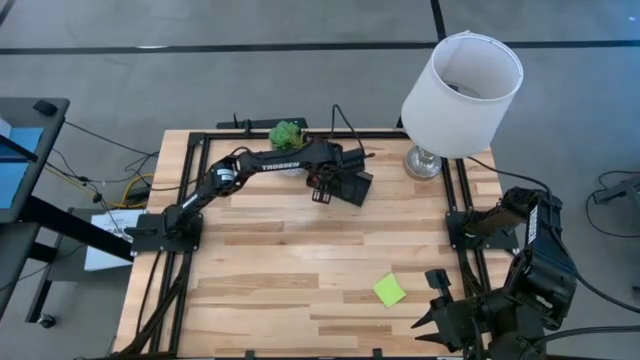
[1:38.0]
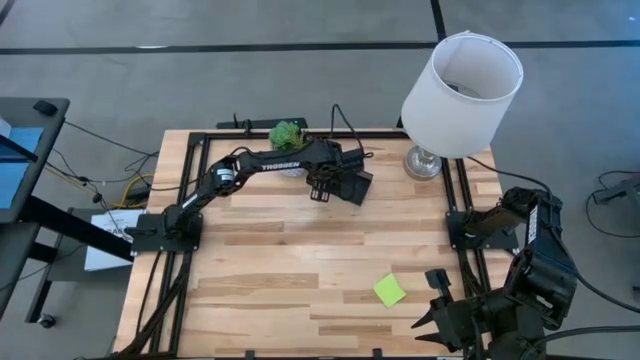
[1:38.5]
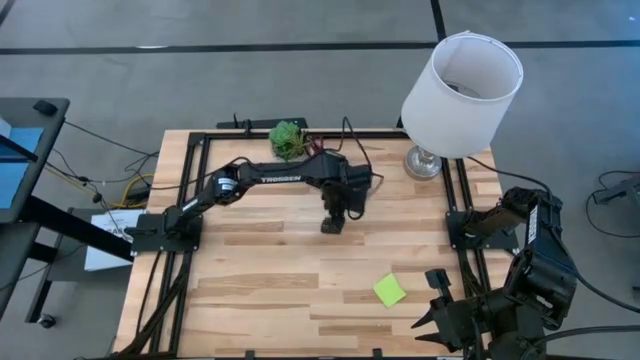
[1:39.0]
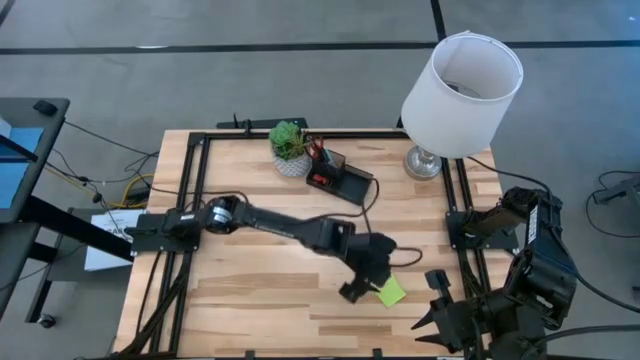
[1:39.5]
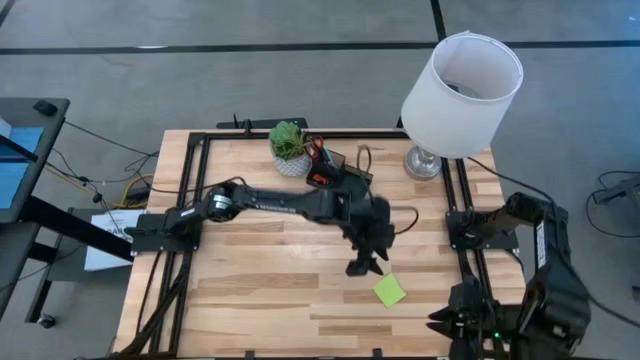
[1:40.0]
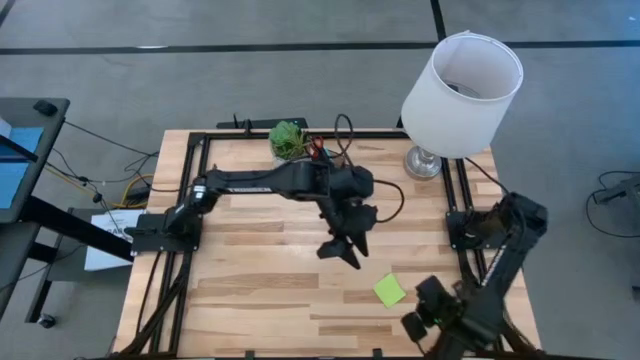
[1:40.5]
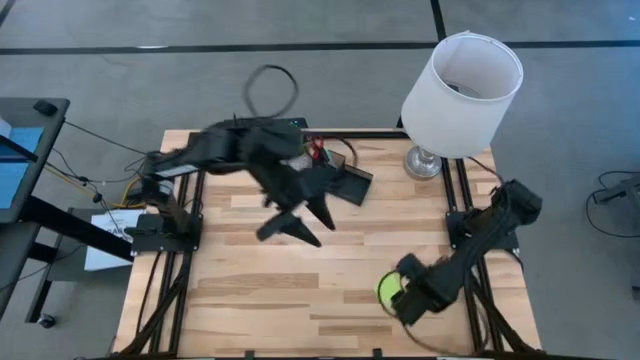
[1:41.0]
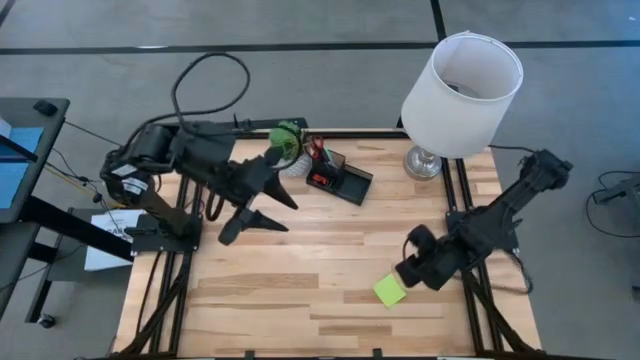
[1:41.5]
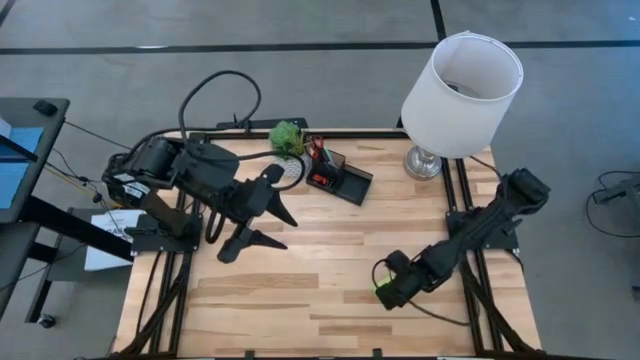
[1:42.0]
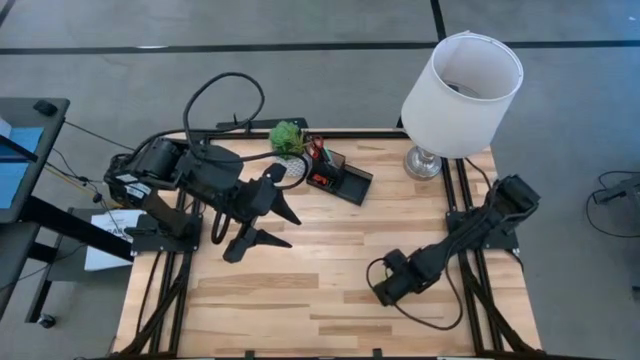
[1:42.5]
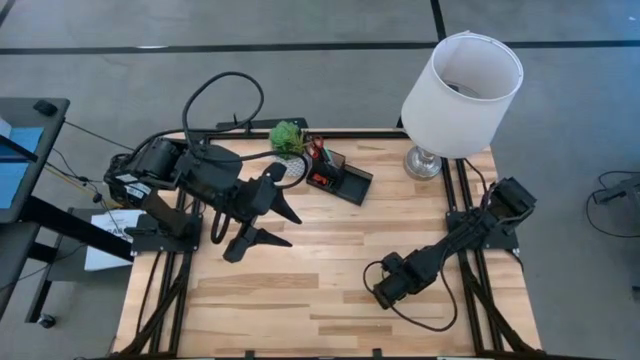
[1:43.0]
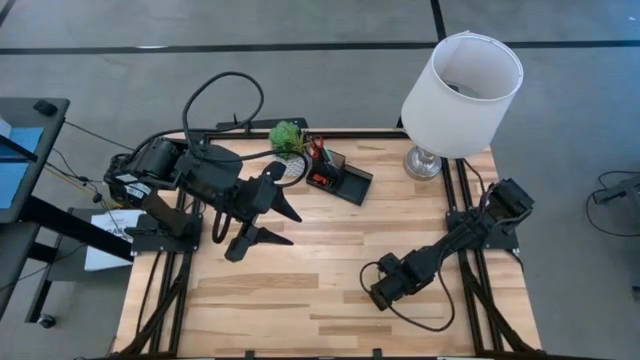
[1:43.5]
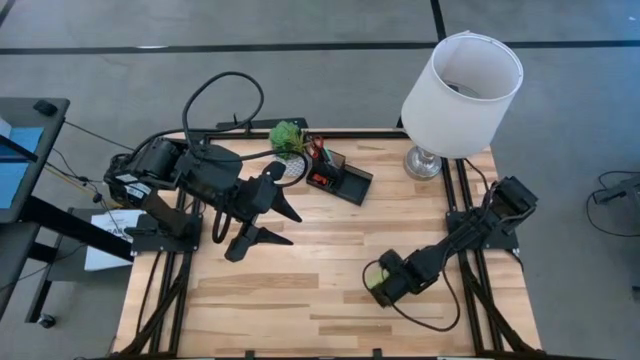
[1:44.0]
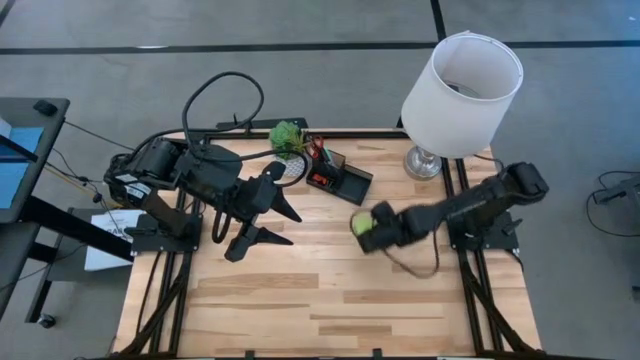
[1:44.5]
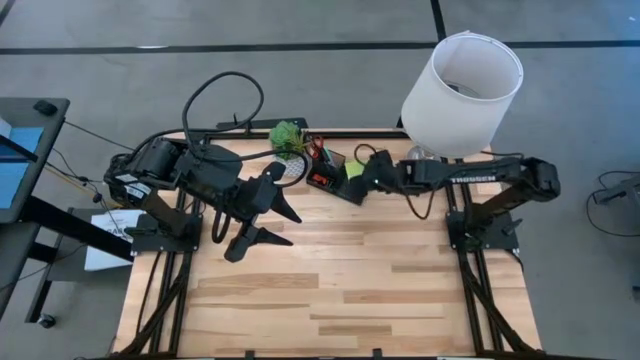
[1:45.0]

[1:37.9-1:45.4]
Task: Pick and place office supplies into organizer
Put the green sticky note into the black desk organizer

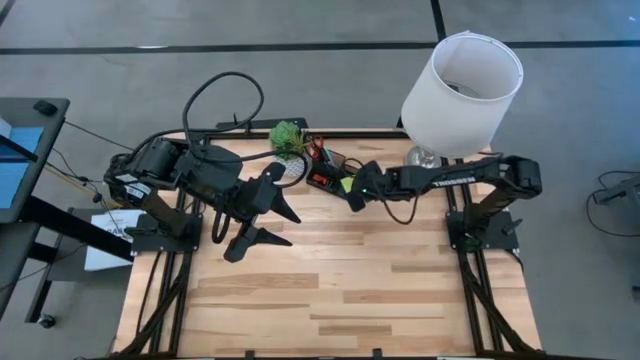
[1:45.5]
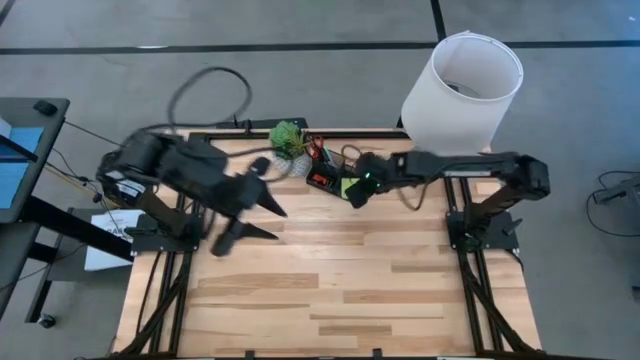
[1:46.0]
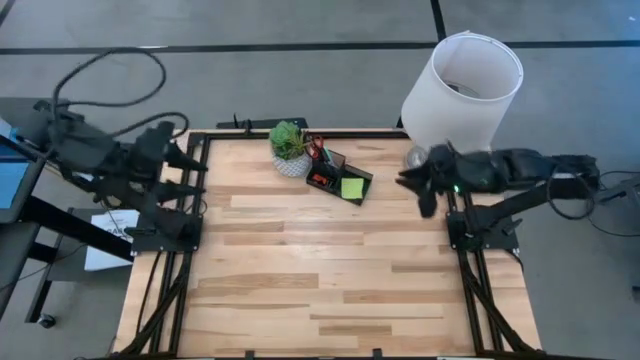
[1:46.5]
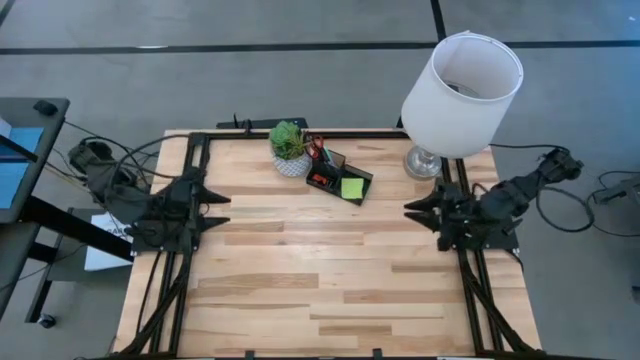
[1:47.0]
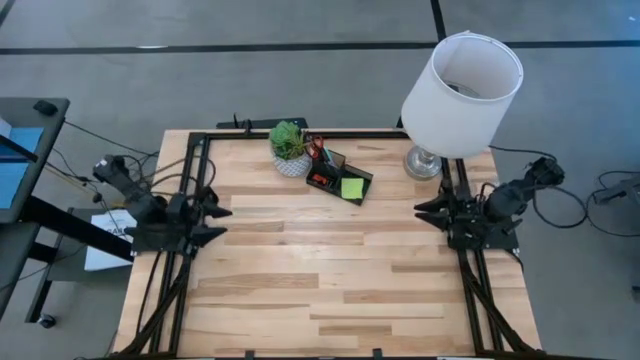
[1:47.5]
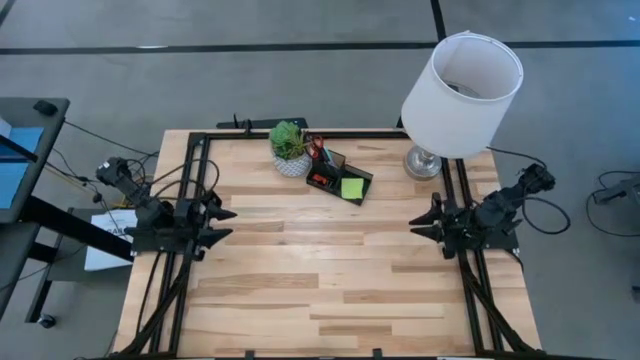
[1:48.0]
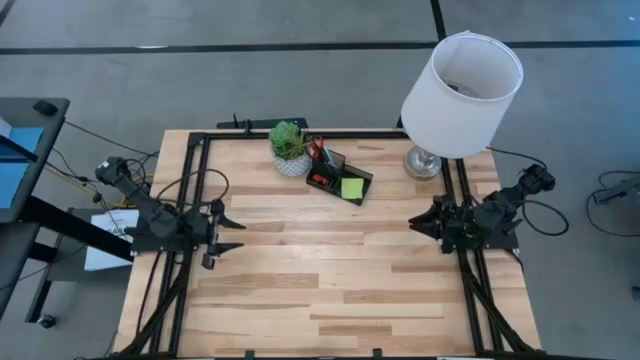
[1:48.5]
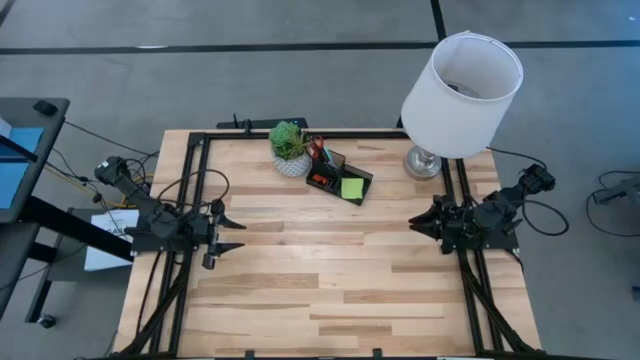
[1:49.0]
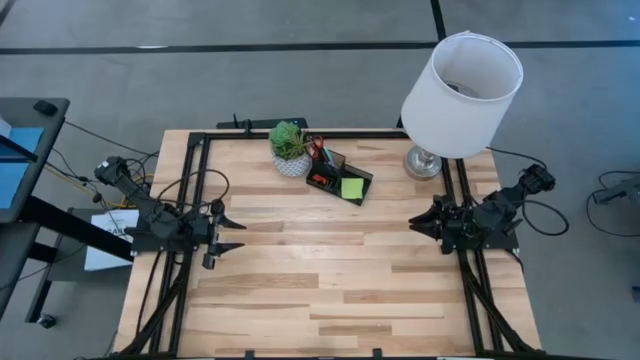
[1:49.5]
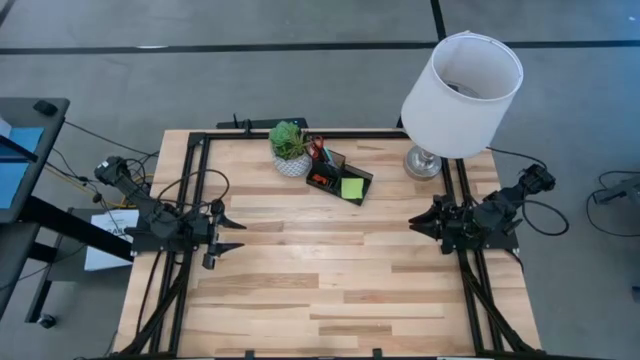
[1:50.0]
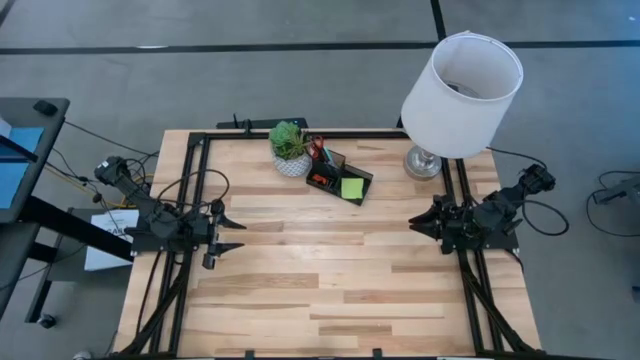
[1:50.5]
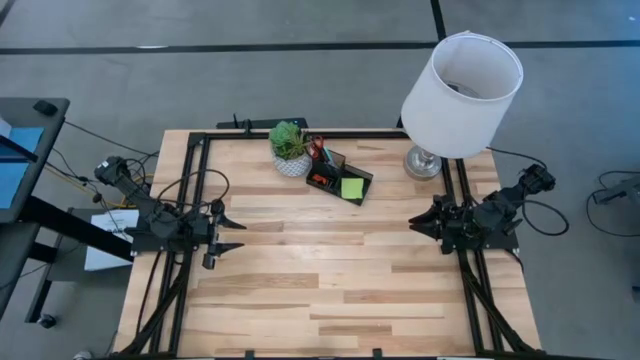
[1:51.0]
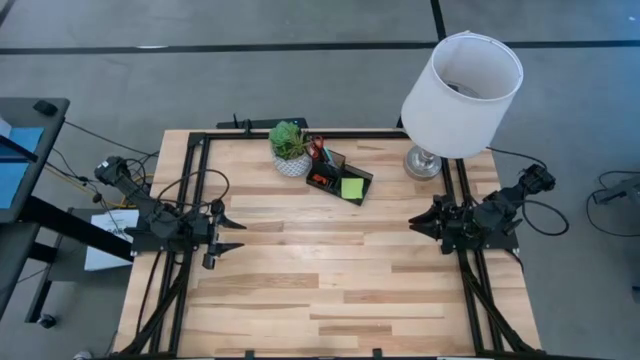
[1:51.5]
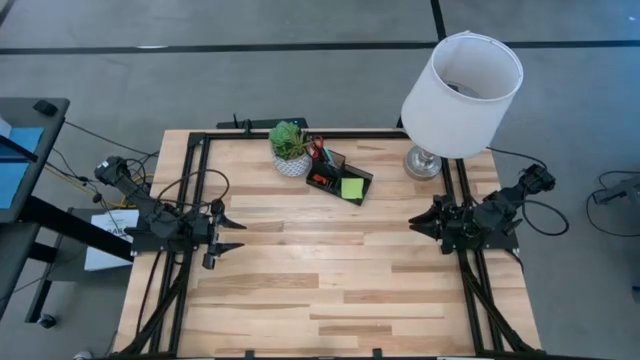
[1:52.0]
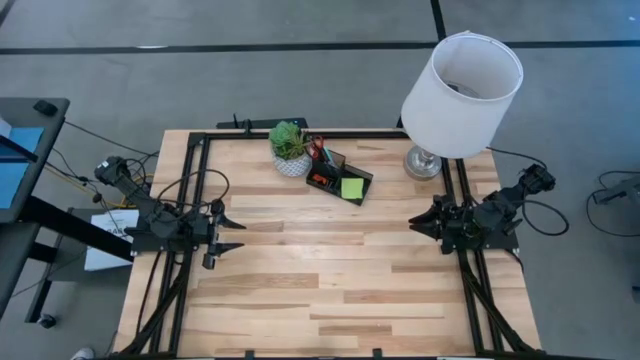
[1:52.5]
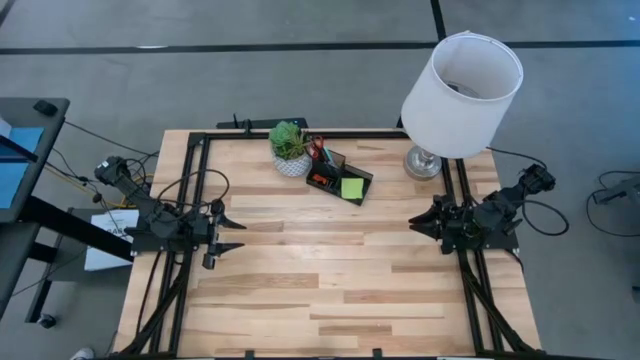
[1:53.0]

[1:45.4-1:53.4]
Return to Home Position

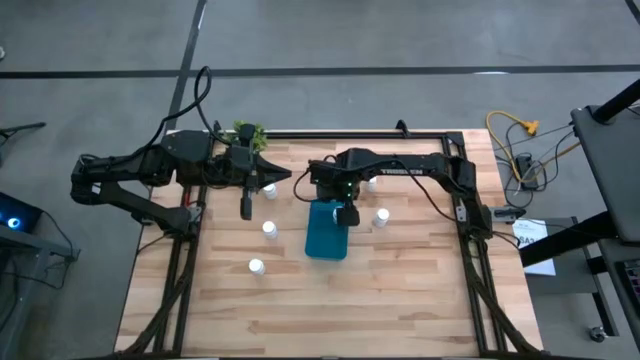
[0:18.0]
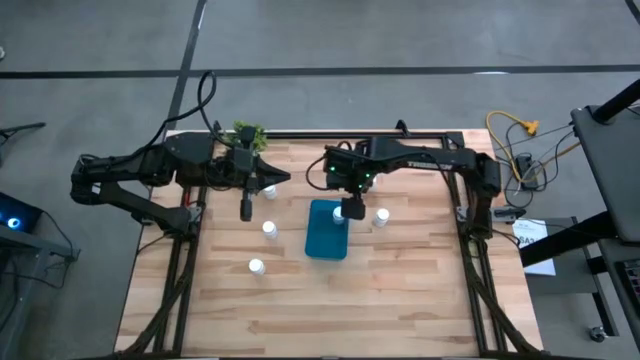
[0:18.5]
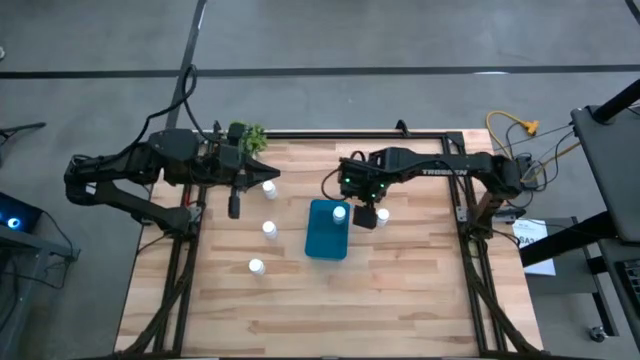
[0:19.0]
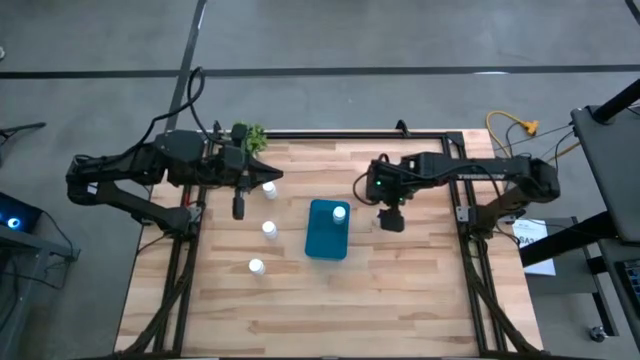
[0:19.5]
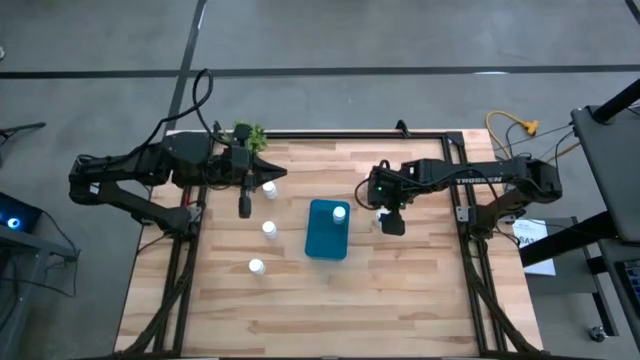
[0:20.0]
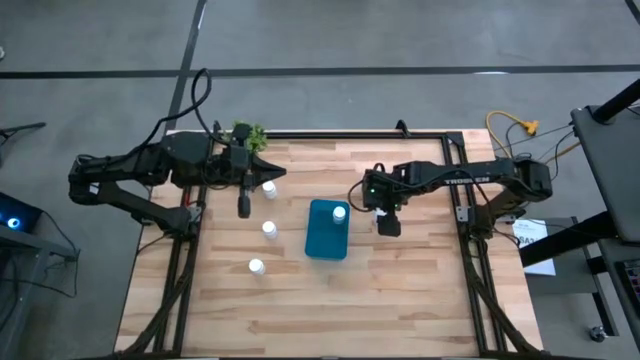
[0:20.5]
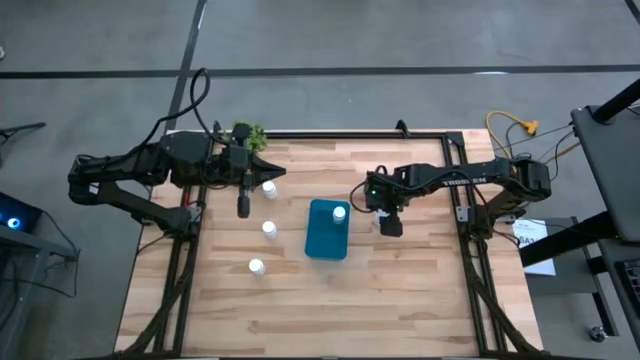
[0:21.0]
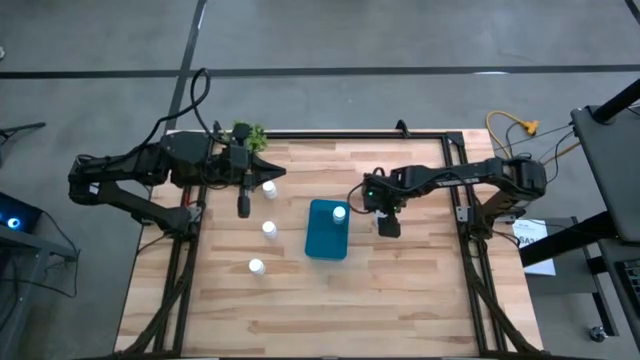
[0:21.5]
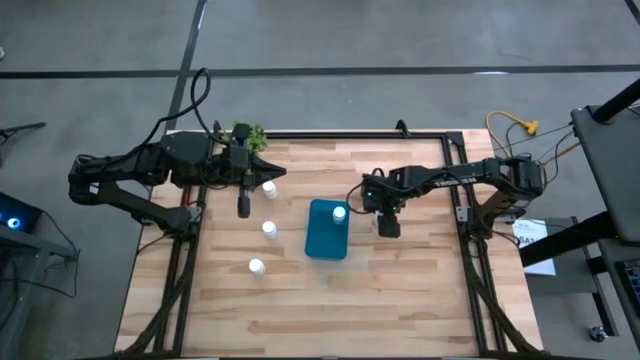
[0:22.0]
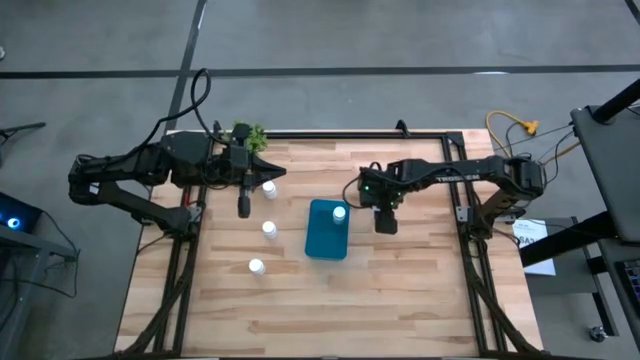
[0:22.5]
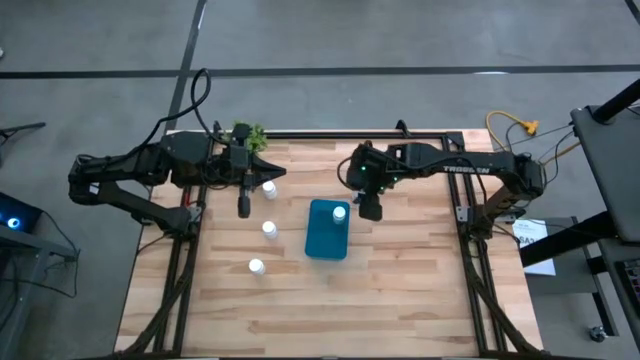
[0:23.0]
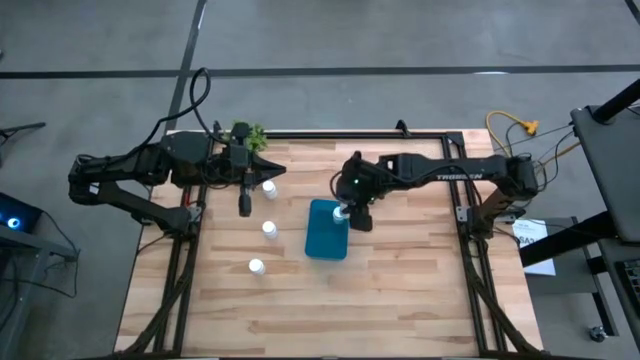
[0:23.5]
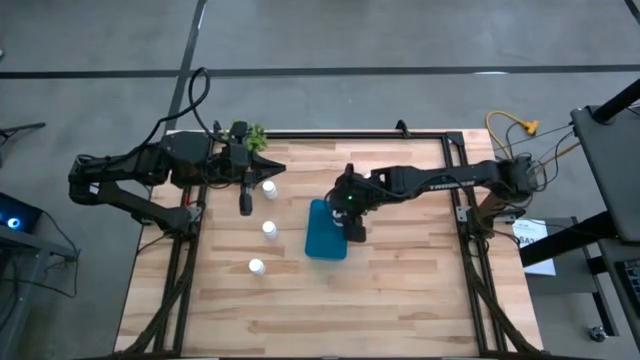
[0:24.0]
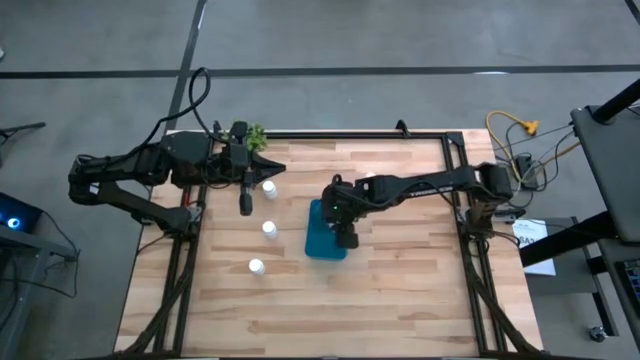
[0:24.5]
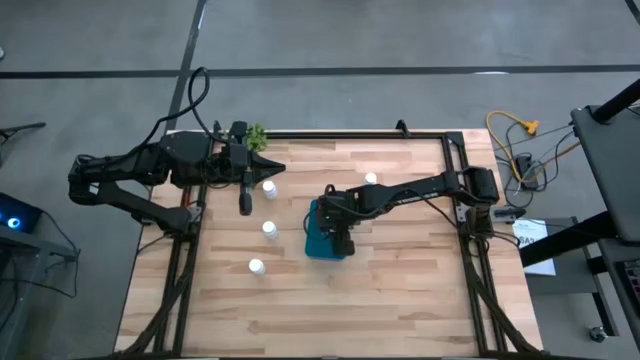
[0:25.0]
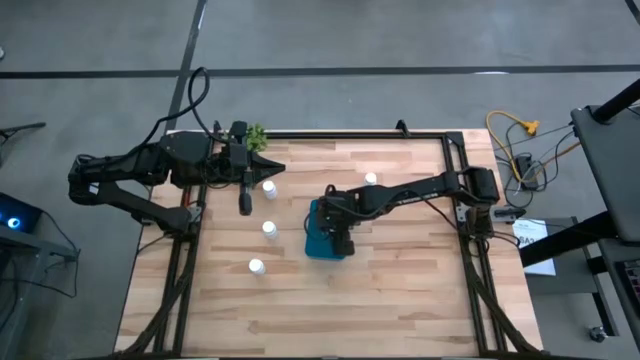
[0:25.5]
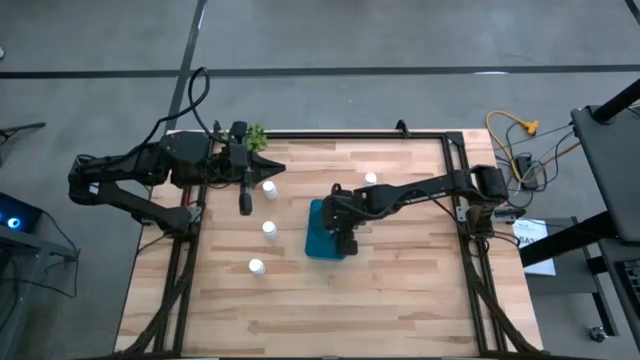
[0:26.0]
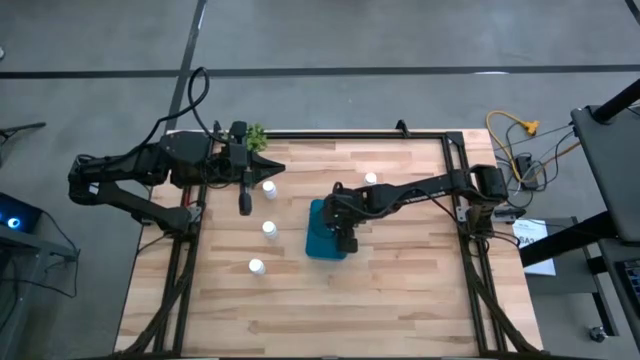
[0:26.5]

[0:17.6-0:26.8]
Task: Pick and place pill bottles into a basket
Put the white pill bottle into the blue container
